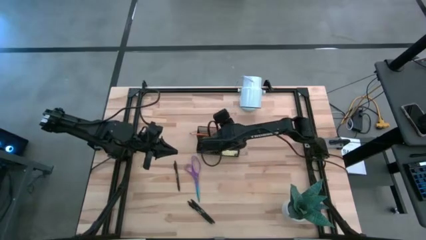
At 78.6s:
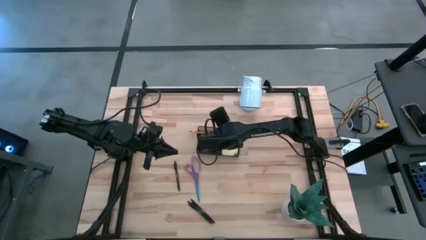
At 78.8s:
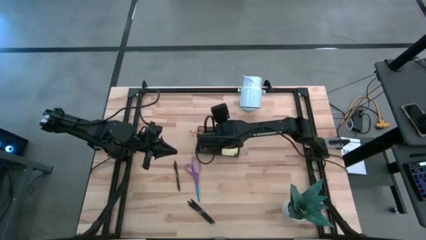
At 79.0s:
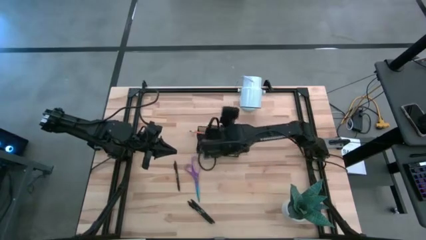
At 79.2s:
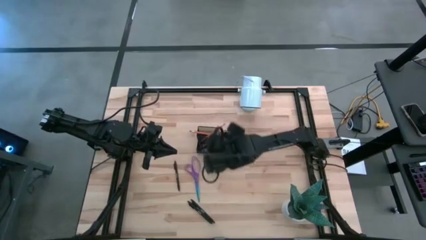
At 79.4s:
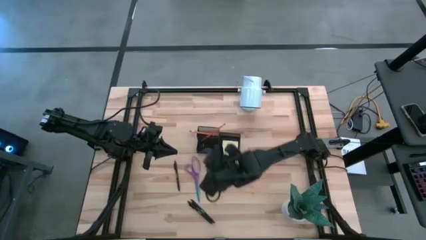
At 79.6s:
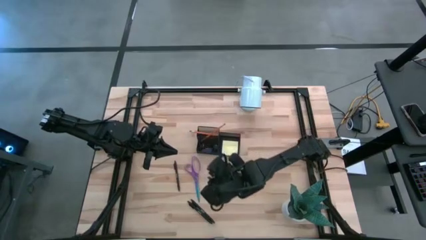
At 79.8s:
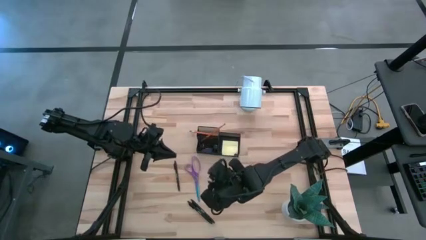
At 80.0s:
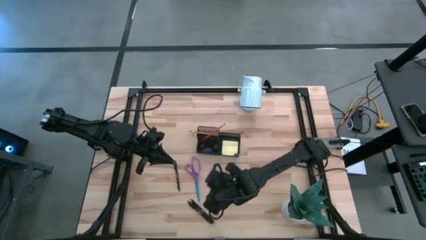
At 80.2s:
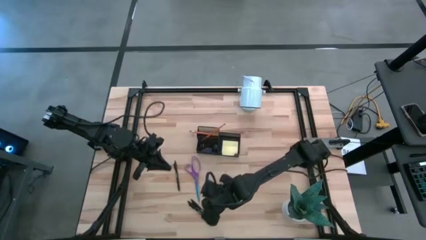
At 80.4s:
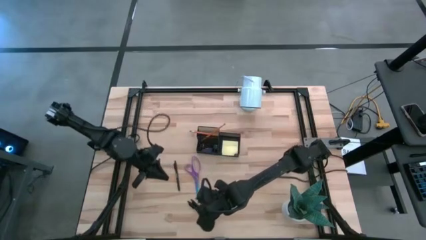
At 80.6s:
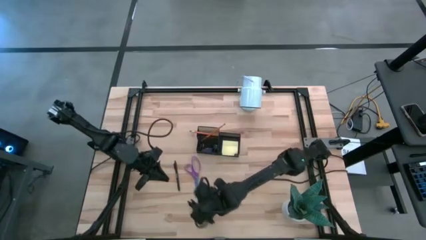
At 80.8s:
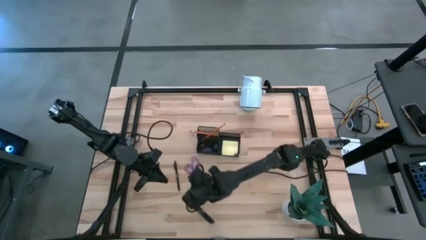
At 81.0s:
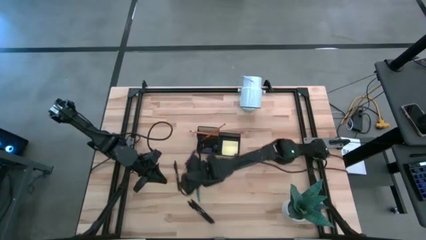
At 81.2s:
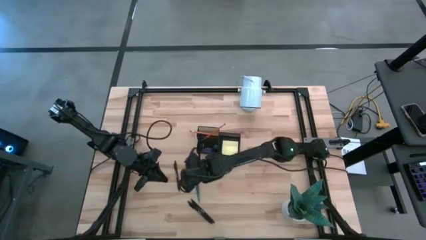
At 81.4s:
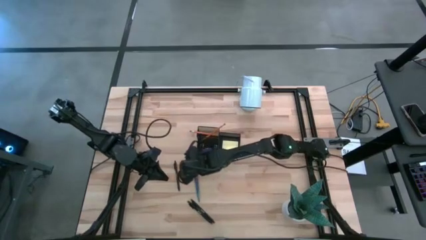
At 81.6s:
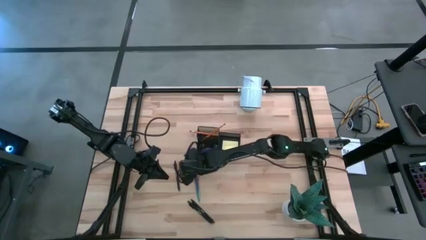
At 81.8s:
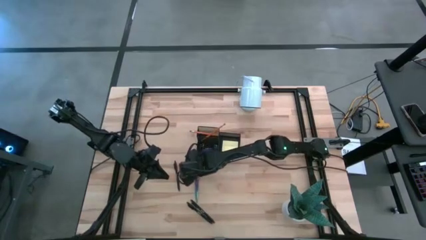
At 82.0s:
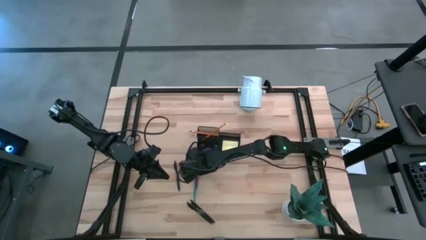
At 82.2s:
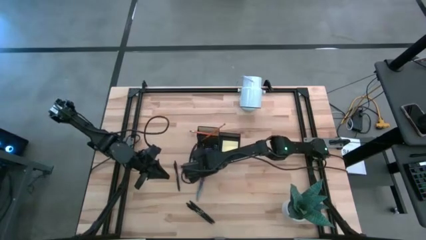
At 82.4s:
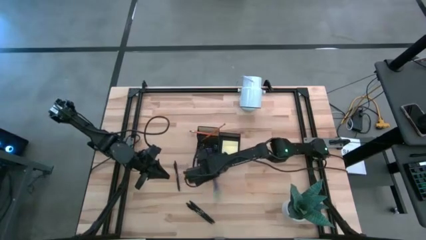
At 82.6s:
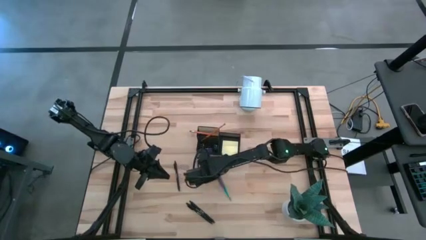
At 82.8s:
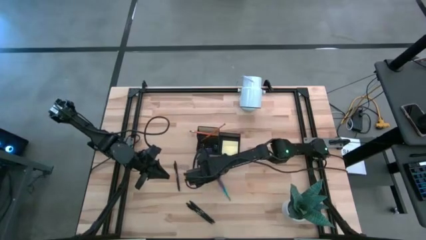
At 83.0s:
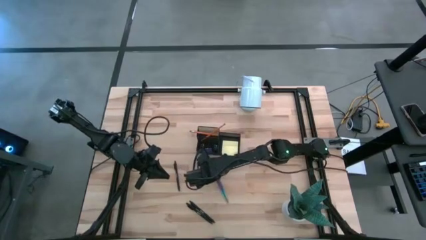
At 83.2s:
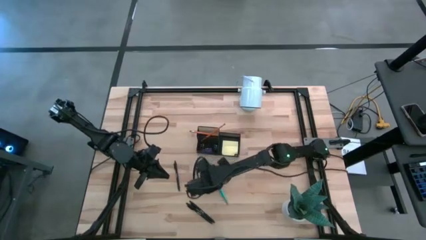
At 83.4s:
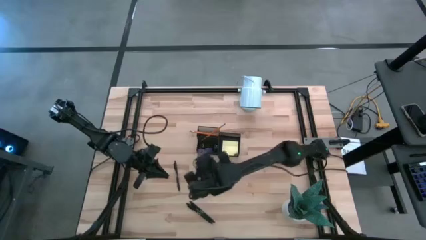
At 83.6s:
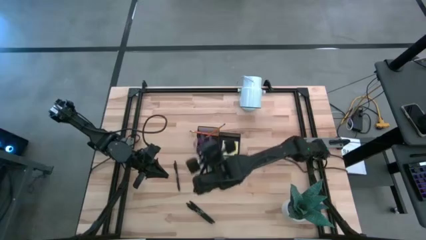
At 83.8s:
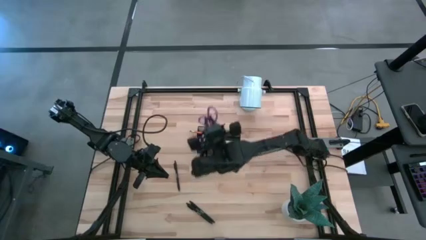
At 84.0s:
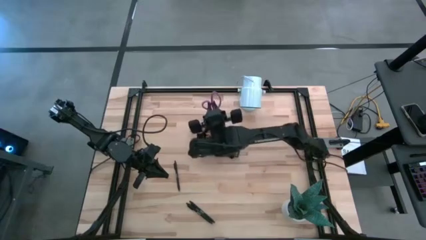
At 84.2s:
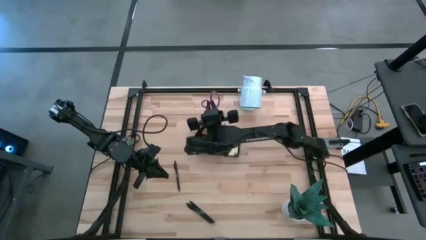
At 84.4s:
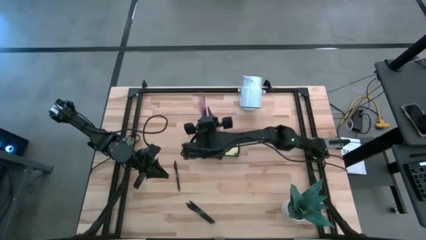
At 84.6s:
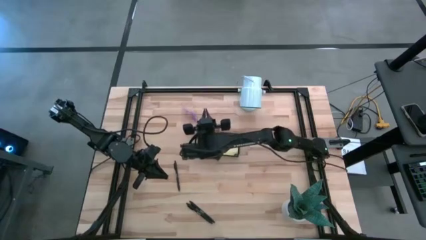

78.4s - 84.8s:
Task: Pick and place office supplies into organizer
Put the purple scissors into the black desk organizer

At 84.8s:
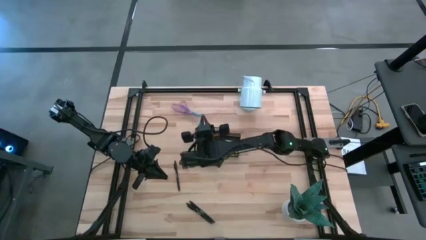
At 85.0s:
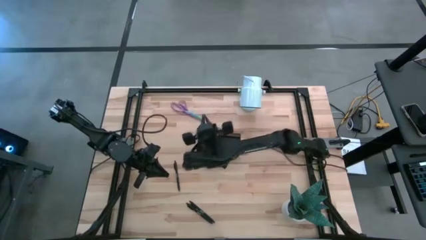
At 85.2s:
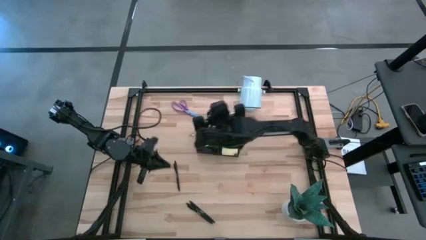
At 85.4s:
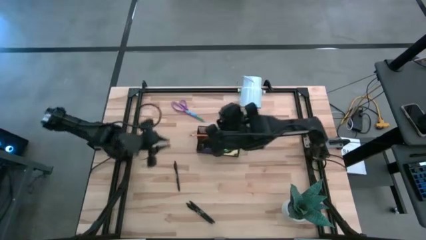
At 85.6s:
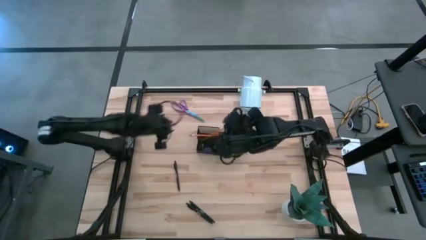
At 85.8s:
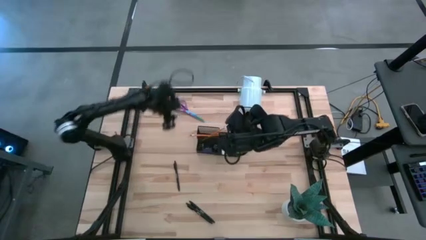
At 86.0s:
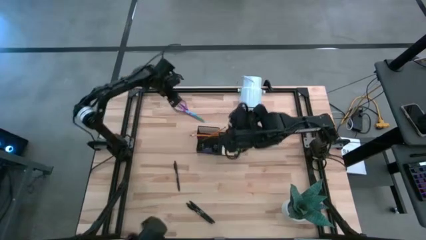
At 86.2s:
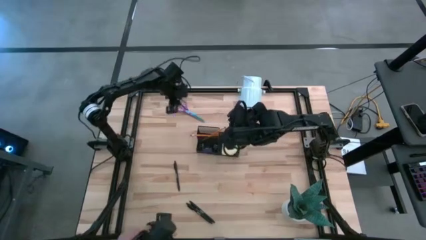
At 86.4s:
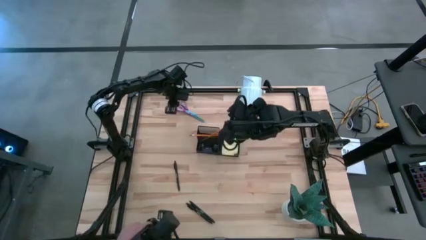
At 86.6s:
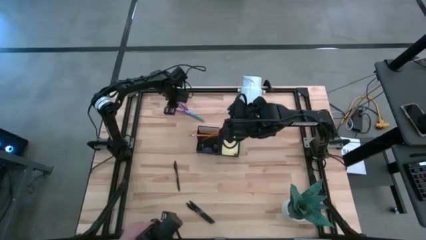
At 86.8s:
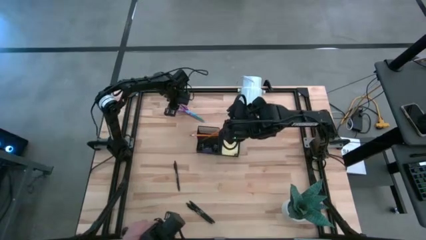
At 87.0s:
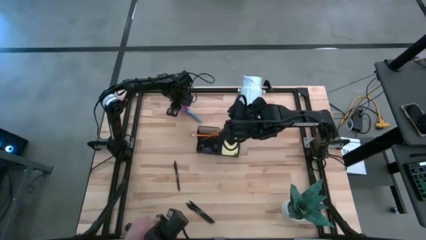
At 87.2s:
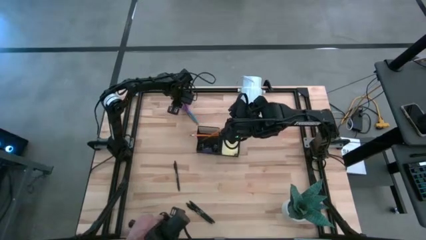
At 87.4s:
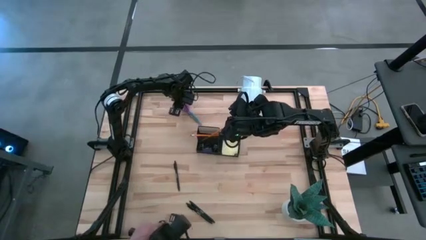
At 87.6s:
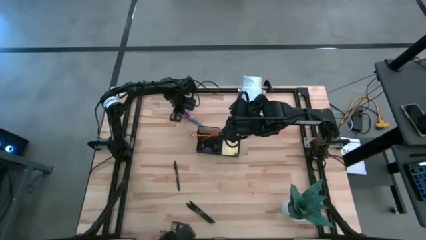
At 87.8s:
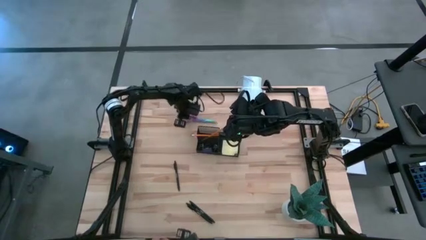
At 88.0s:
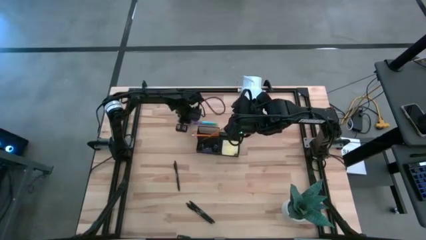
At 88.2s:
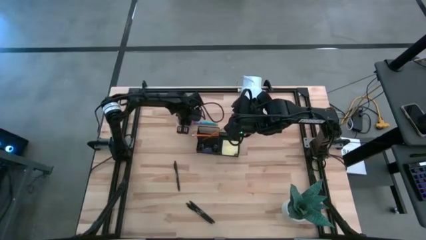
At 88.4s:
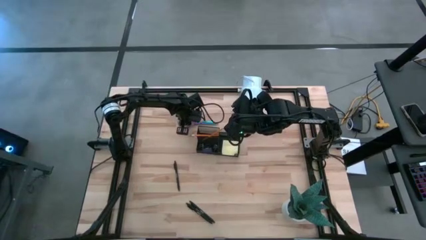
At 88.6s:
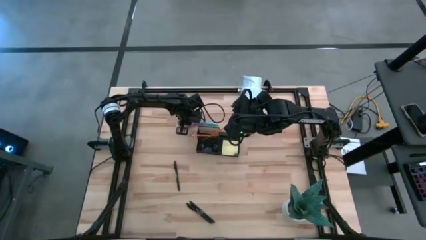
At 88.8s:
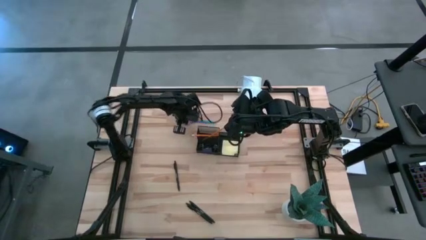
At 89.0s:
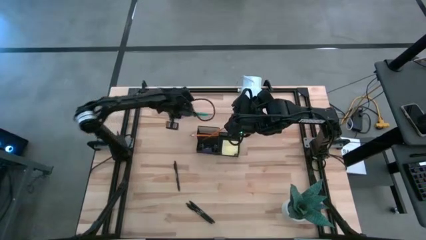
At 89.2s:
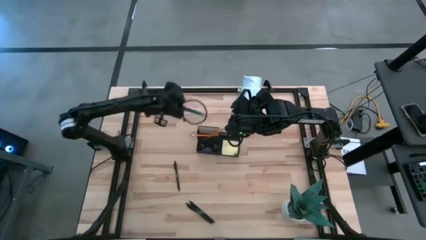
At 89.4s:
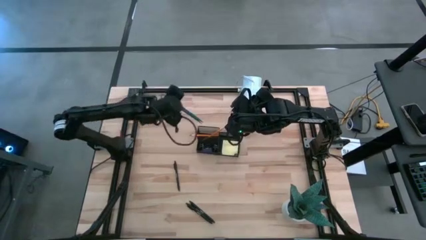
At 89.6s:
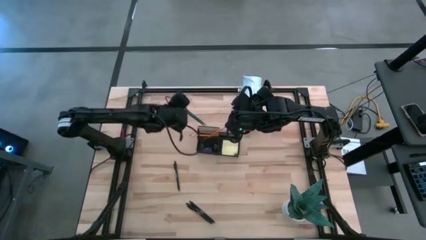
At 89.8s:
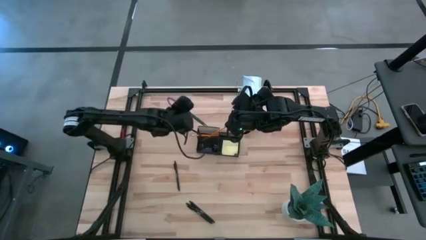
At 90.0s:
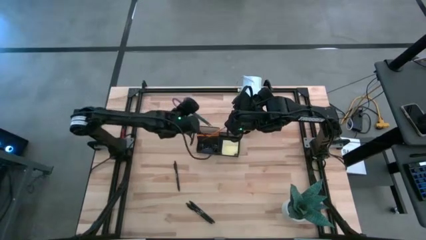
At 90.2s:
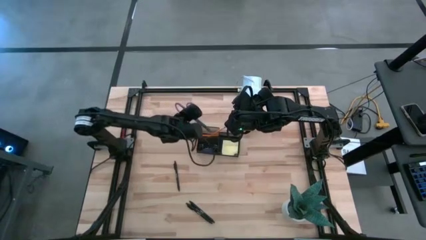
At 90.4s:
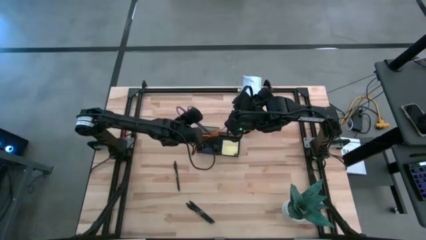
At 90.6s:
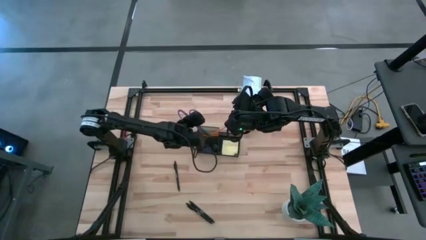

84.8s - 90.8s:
Put the purple scissors into the black desk organizer

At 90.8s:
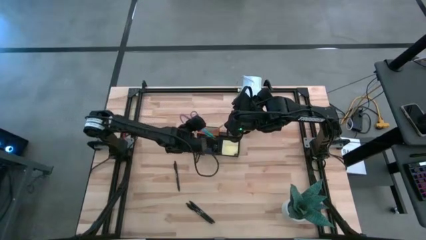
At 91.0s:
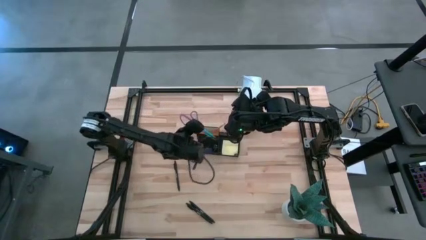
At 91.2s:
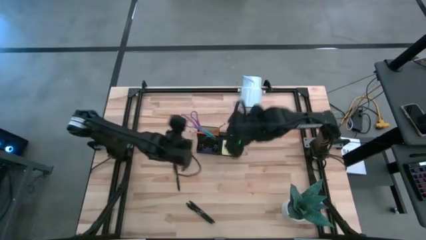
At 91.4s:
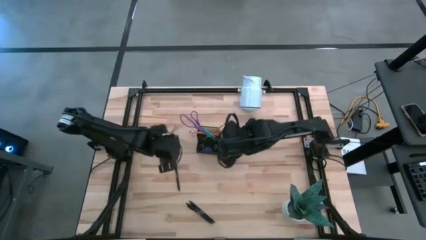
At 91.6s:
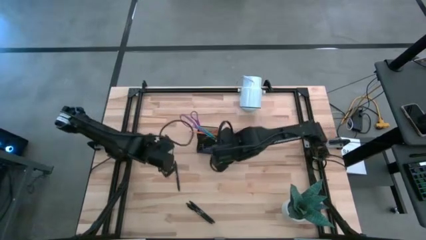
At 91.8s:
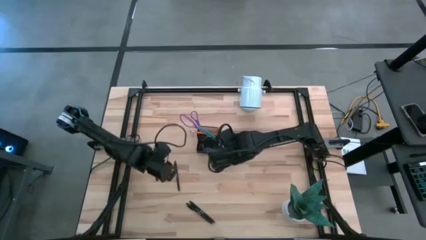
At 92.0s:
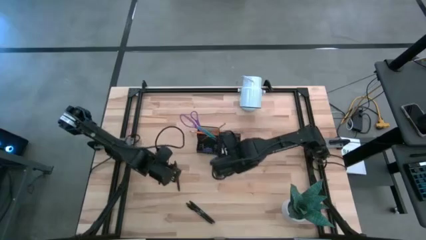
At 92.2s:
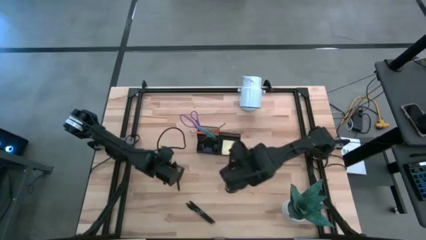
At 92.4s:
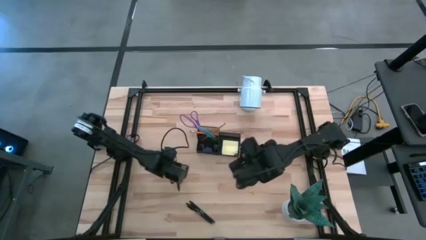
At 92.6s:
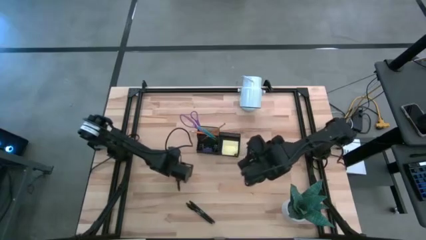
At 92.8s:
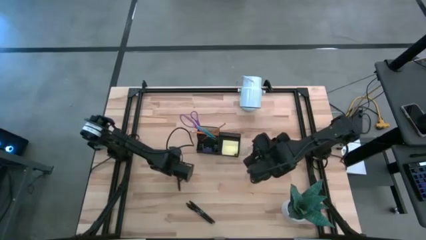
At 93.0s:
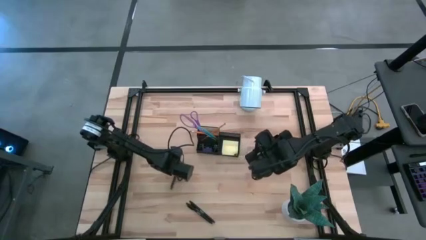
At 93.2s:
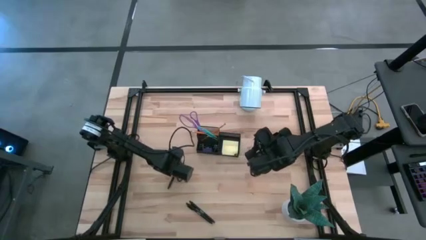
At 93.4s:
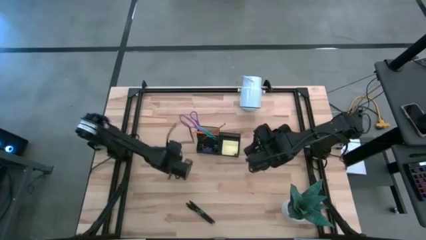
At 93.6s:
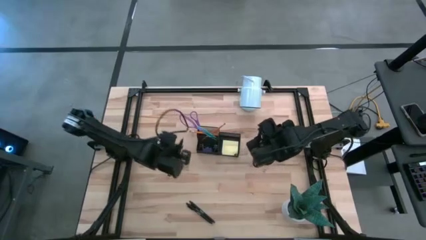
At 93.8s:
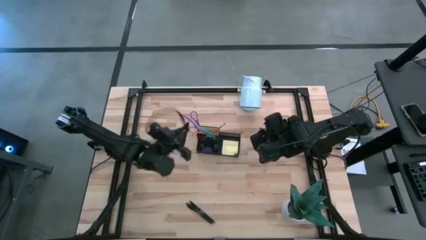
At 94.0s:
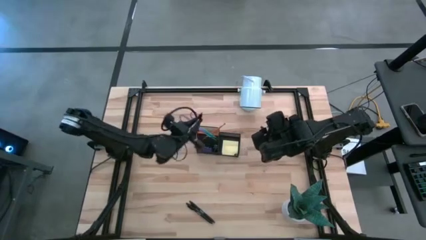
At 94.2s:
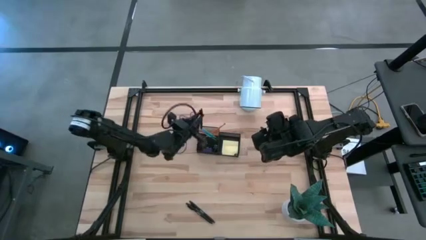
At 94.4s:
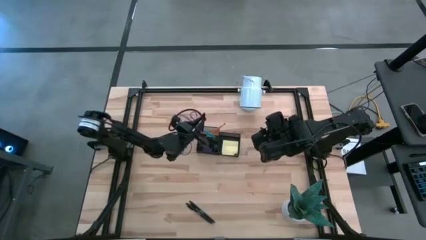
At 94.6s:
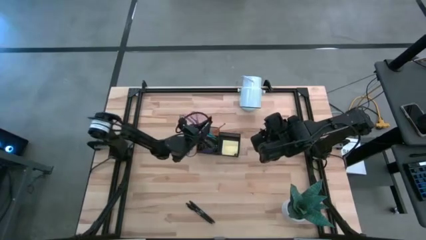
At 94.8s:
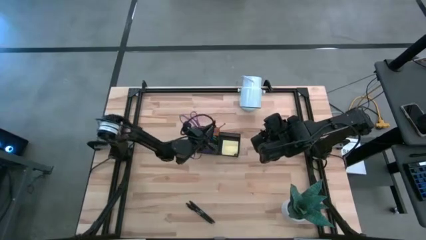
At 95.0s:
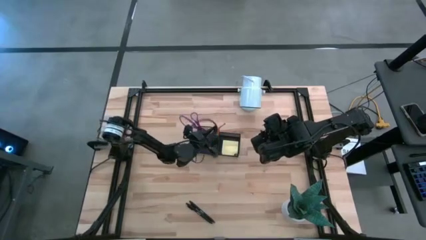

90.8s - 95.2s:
Put the top black pen into the black desk organizer
